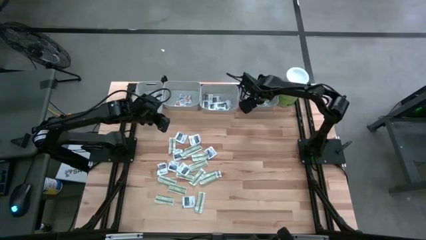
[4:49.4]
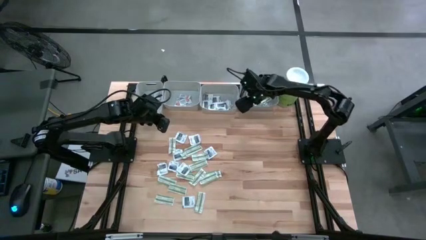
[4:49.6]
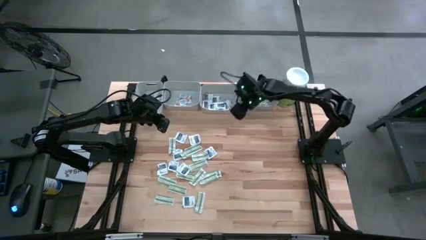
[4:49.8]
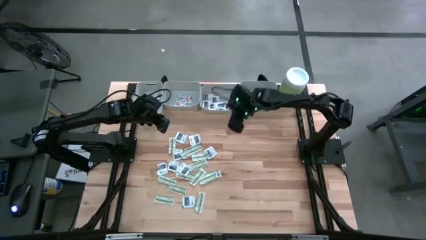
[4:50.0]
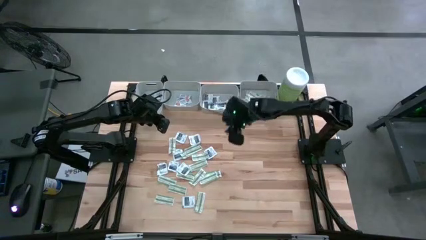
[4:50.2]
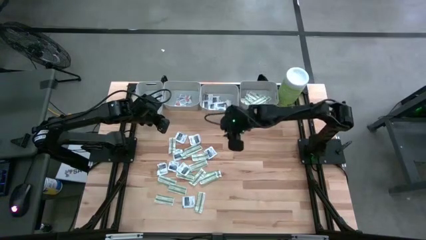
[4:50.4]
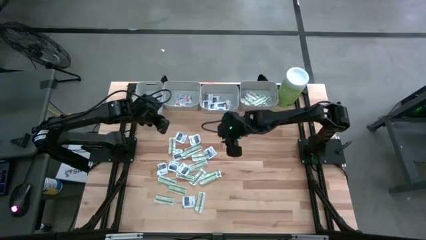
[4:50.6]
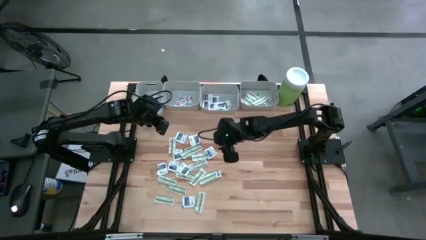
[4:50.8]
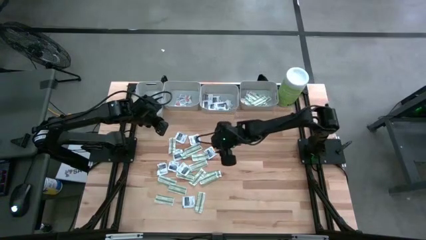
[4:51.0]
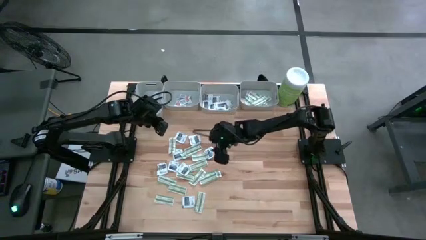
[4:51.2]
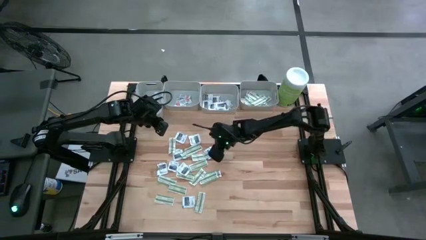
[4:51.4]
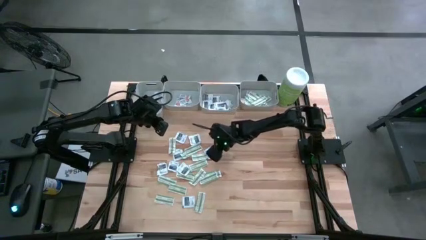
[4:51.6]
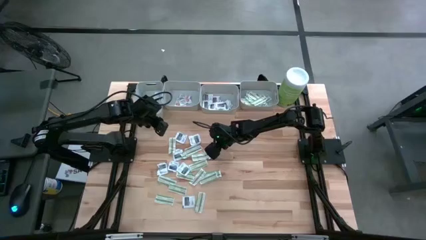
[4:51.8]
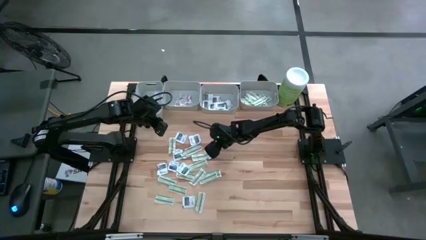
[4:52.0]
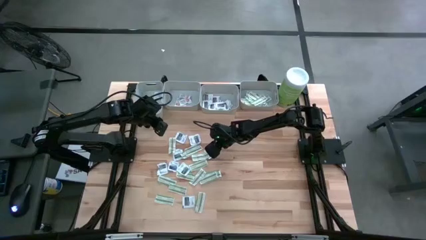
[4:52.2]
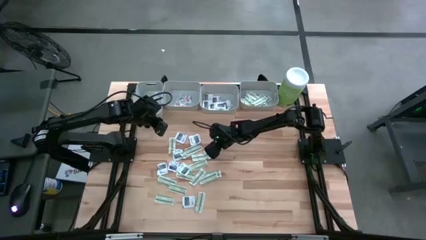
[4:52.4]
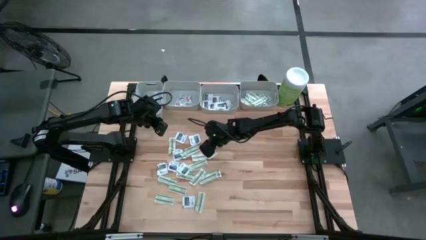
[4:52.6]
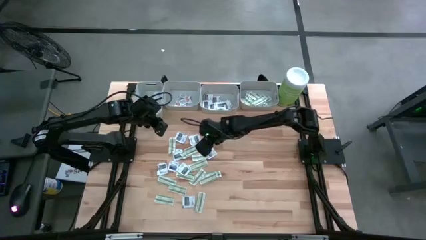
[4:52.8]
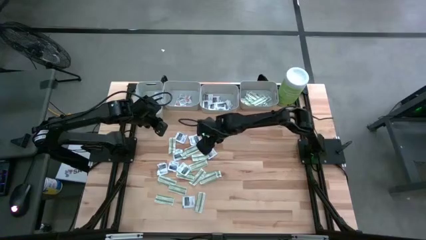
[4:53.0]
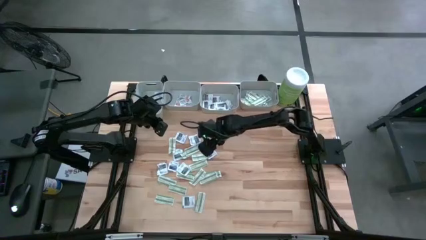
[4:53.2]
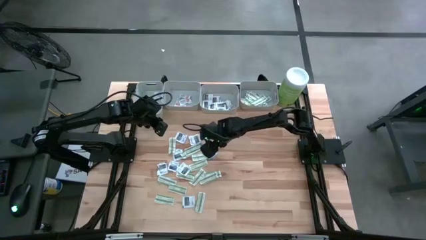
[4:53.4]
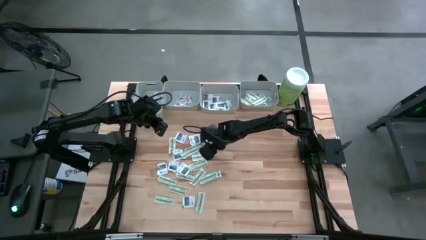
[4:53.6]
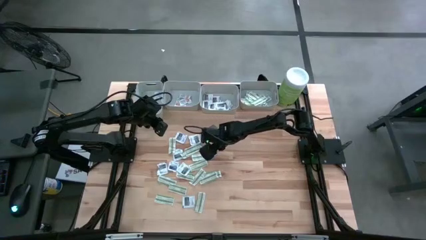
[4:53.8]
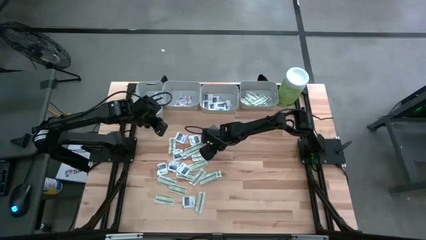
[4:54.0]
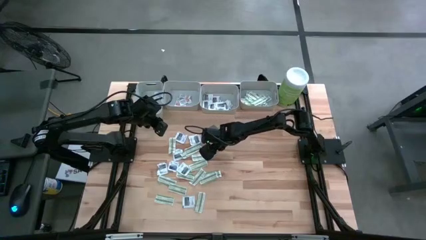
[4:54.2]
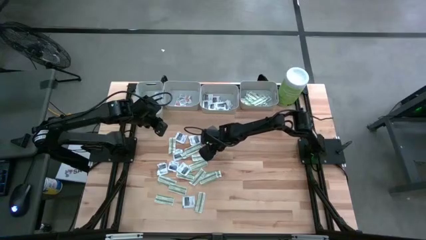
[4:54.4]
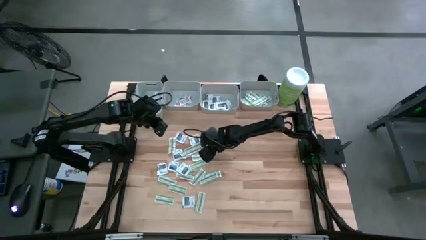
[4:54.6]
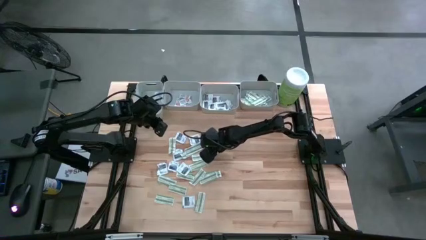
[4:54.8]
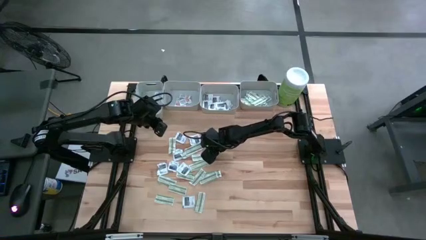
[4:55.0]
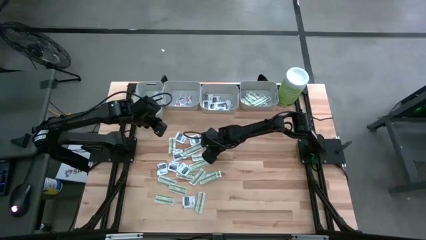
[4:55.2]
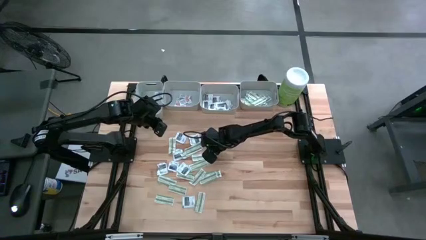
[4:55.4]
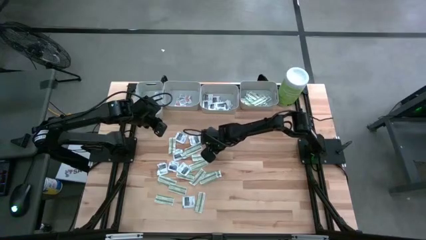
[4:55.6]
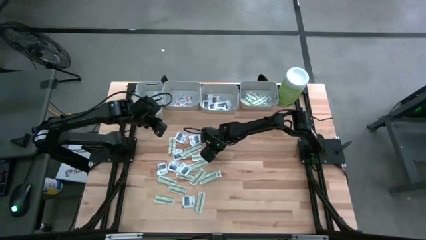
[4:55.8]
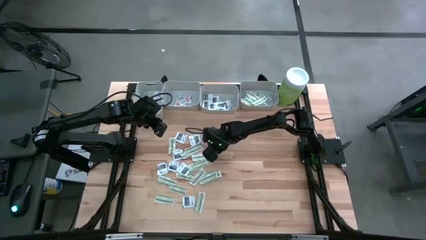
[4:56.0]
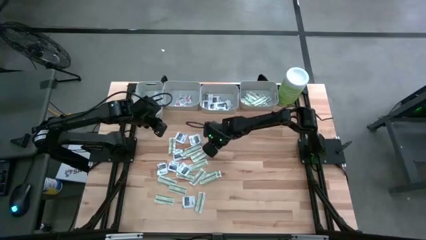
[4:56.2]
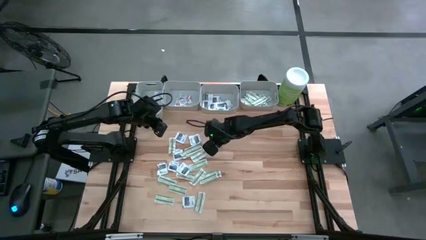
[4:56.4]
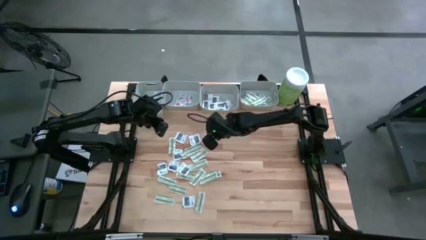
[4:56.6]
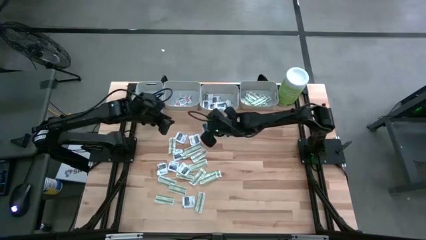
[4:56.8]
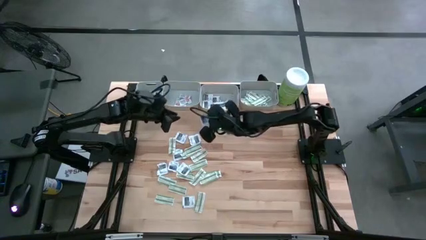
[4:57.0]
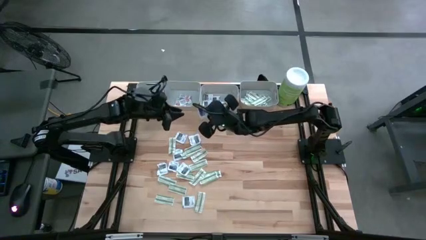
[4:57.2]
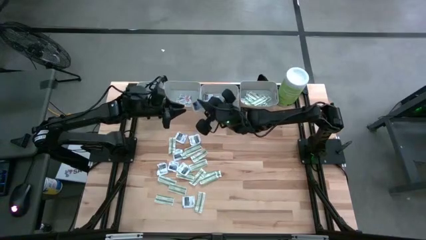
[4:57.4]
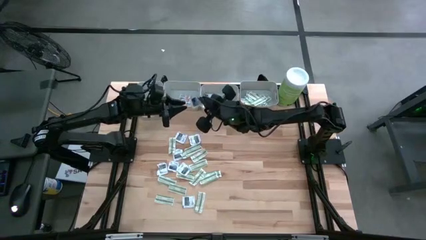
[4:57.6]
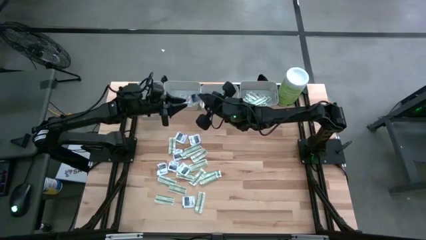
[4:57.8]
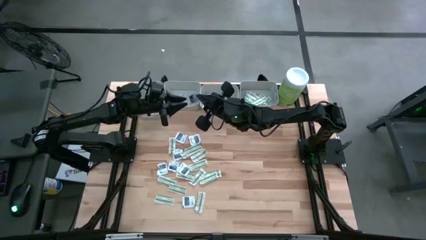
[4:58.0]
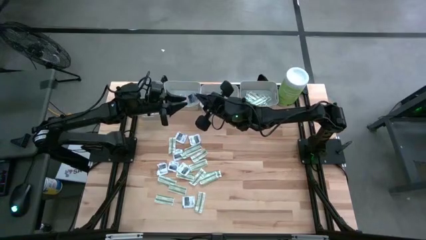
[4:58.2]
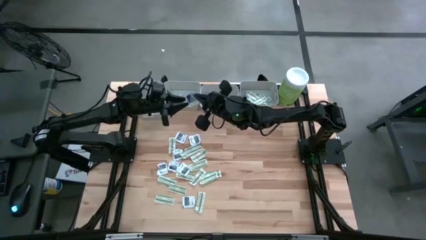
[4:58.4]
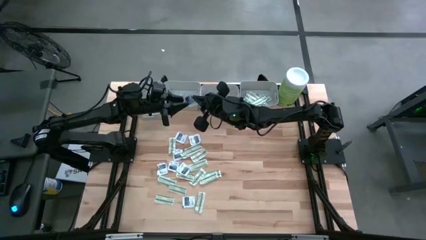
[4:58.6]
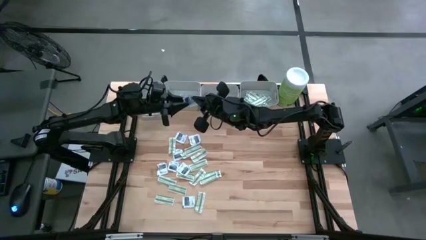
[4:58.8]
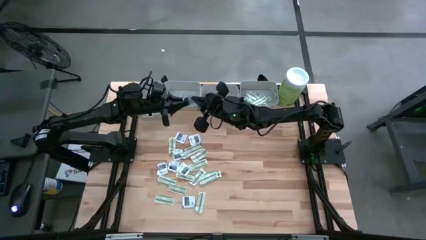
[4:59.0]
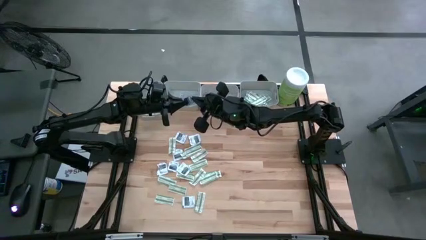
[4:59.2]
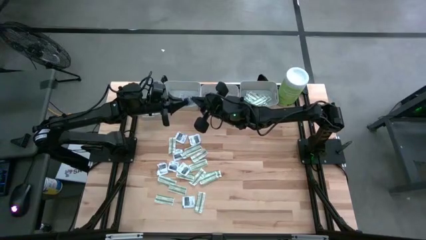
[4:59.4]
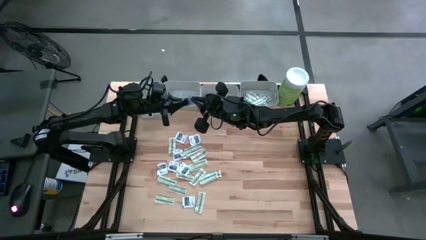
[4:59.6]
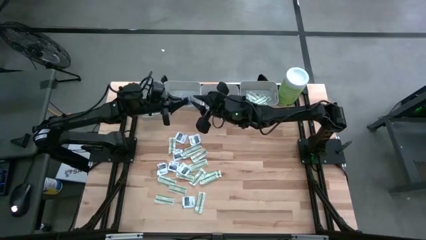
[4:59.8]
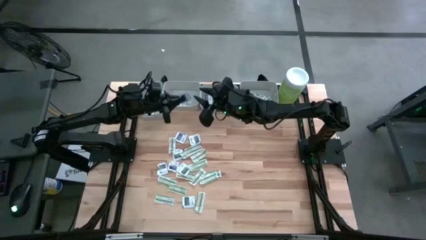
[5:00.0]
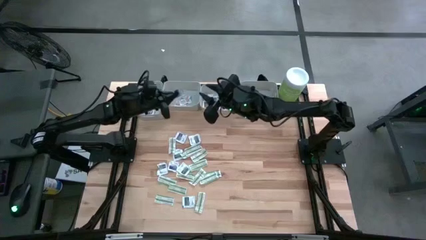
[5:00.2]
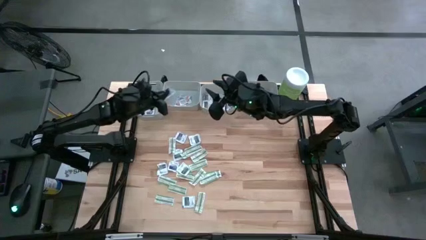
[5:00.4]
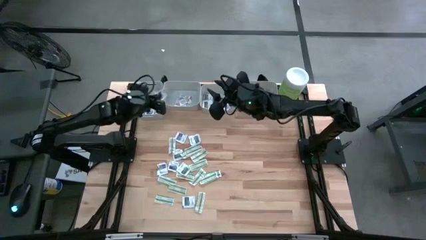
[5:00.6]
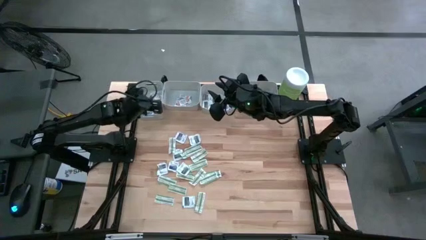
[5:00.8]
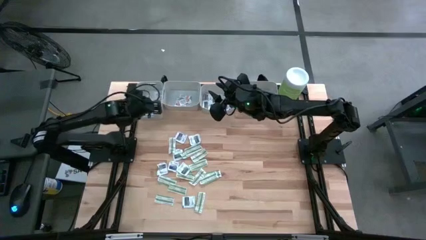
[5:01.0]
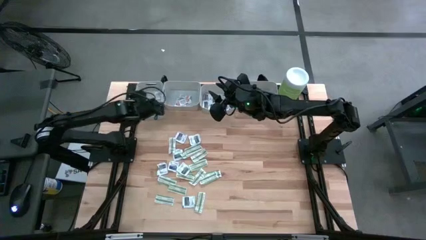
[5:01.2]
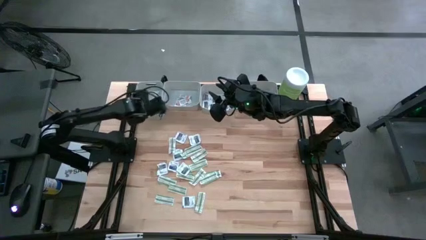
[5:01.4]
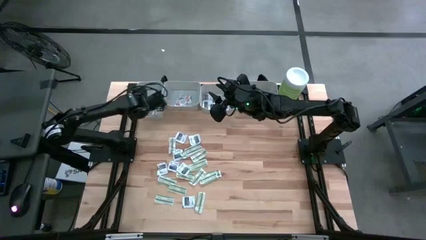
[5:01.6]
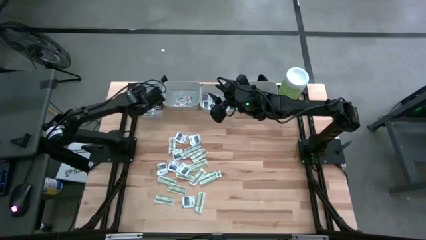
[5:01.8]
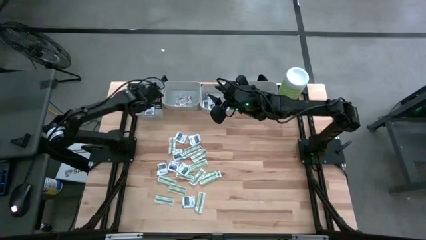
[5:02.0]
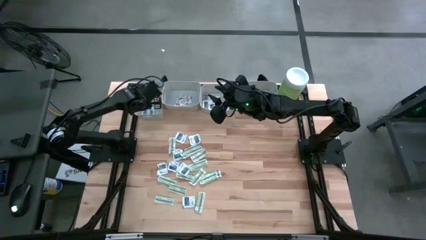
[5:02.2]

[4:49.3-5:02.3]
Task: Pick & Place First Aid Supplies
Put the blue alcohol pad into the left gray bin

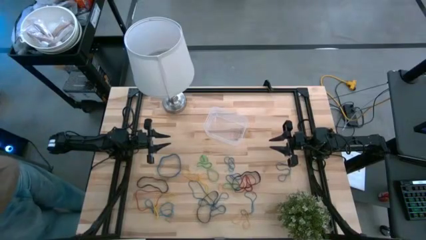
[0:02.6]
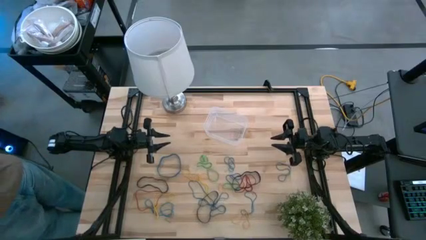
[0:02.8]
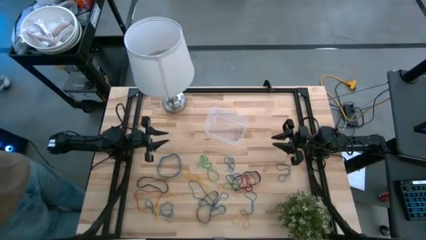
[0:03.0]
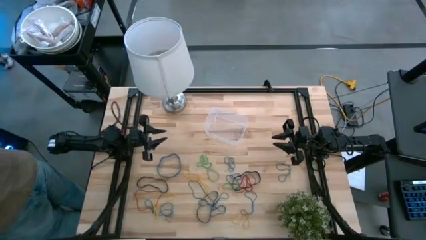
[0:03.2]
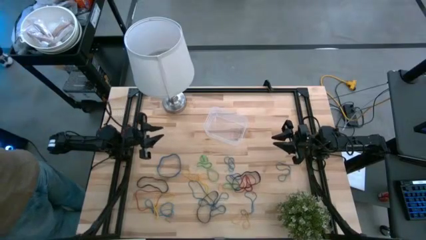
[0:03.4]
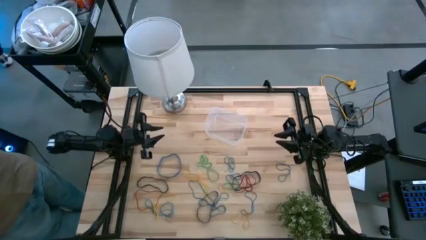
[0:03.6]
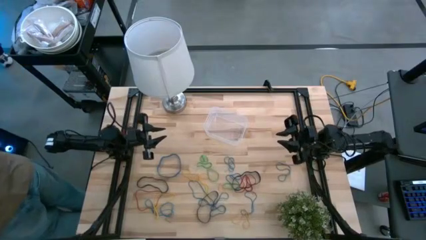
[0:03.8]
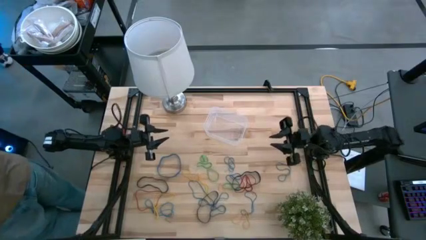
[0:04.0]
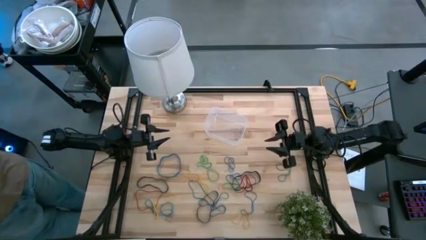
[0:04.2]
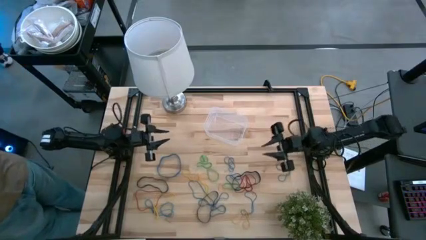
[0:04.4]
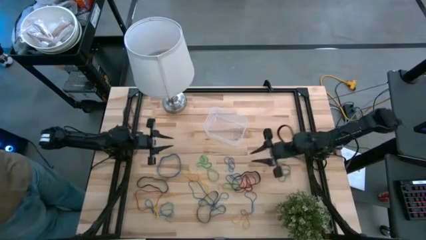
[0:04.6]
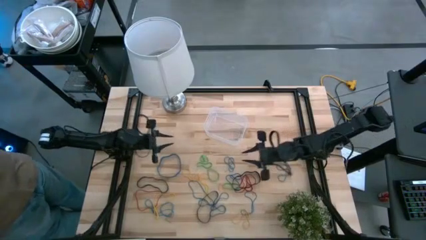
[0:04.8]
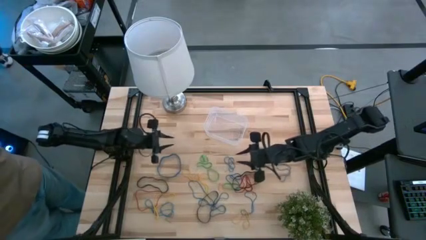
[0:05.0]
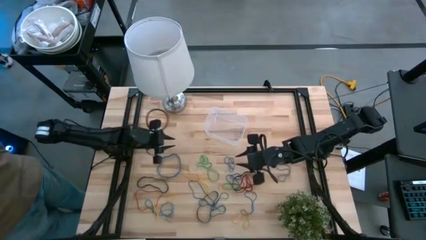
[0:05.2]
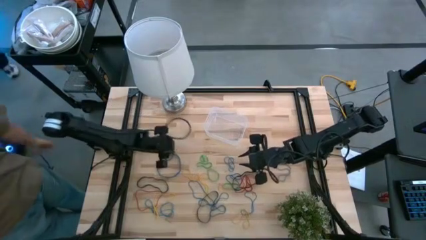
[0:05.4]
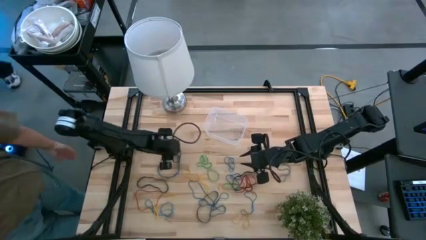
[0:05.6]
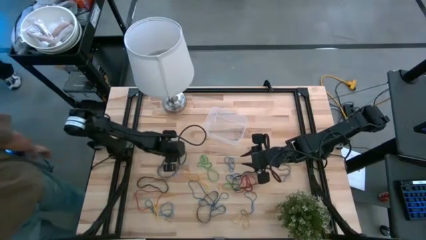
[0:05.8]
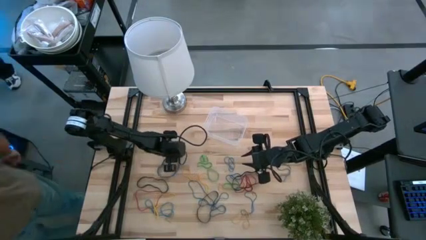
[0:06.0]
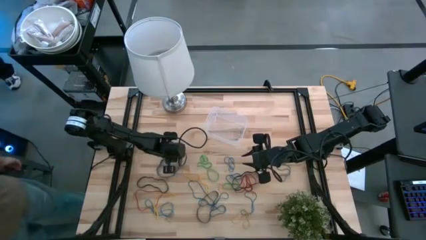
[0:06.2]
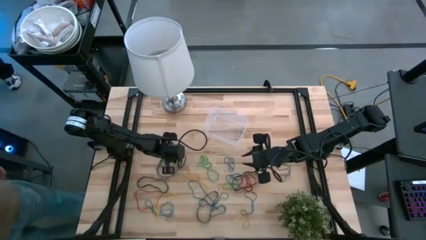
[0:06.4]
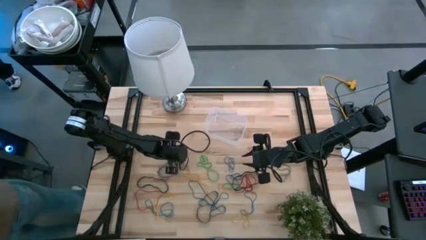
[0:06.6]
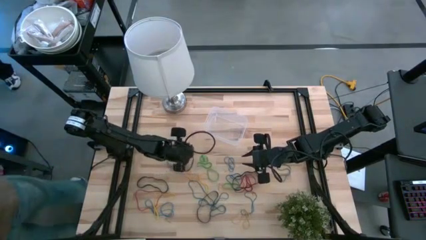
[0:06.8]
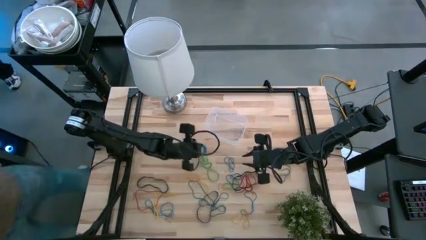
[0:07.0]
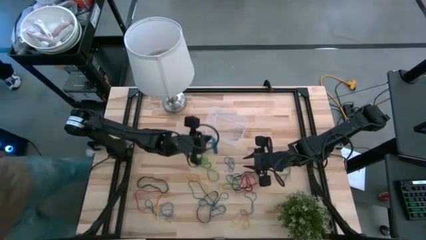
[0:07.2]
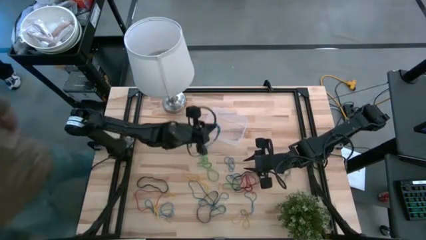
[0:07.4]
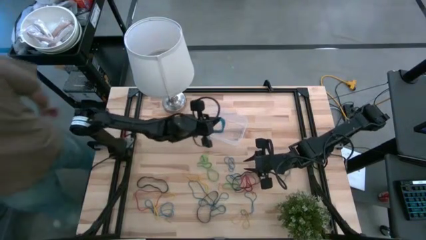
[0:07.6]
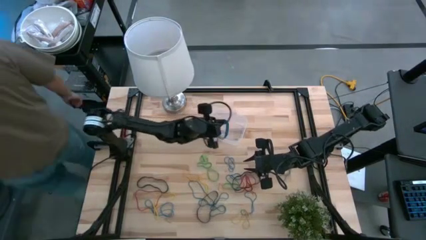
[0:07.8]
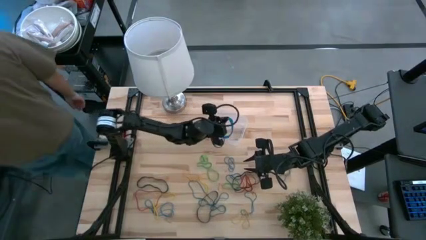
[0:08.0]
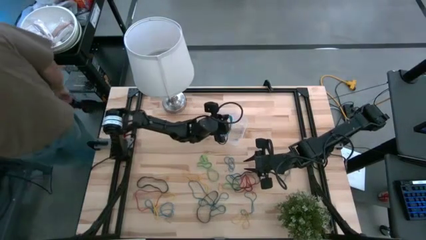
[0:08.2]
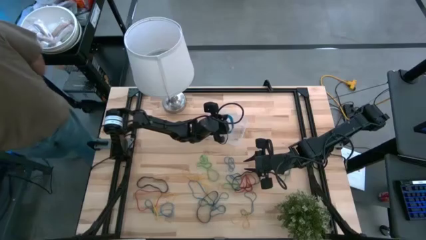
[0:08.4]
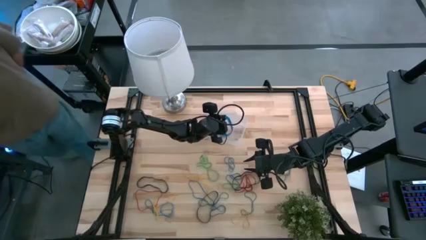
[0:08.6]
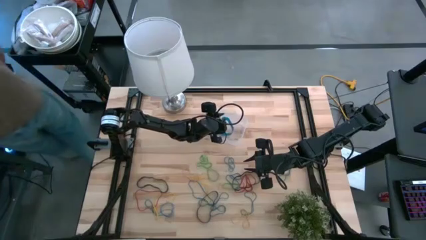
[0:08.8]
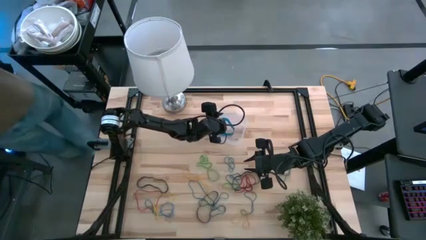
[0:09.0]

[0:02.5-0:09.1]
Task: Pick and place rubber bands into bin
Put the blue rubber bands into the bin
